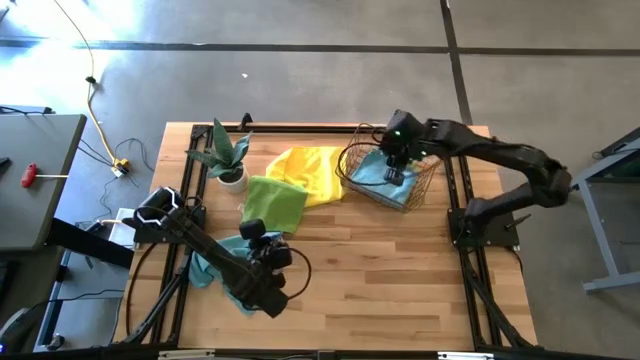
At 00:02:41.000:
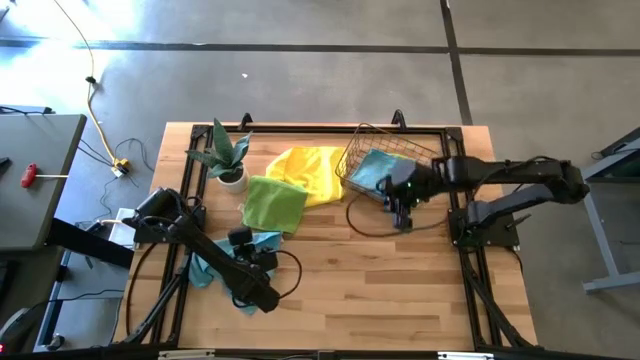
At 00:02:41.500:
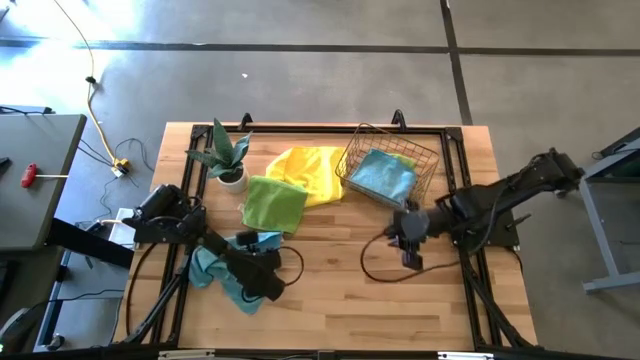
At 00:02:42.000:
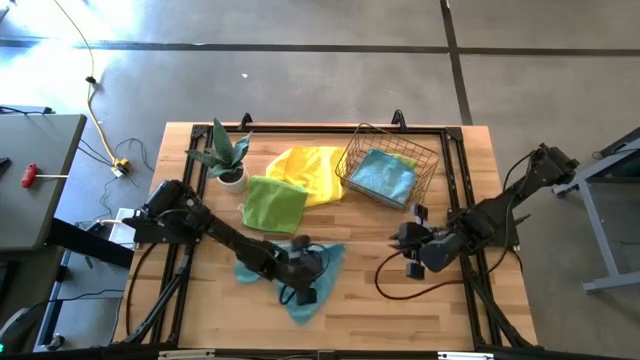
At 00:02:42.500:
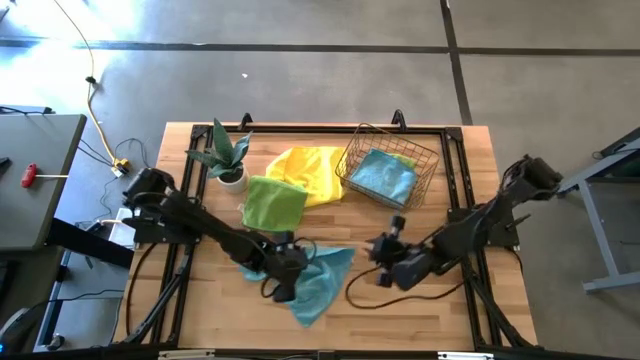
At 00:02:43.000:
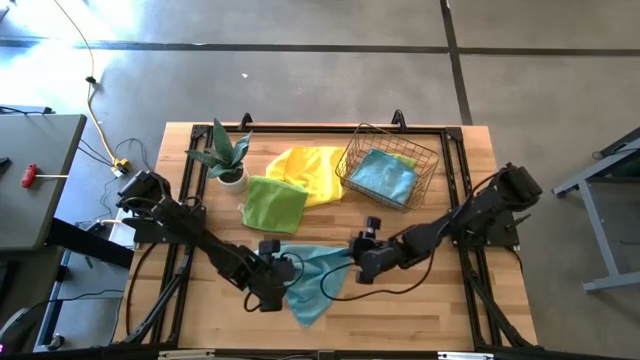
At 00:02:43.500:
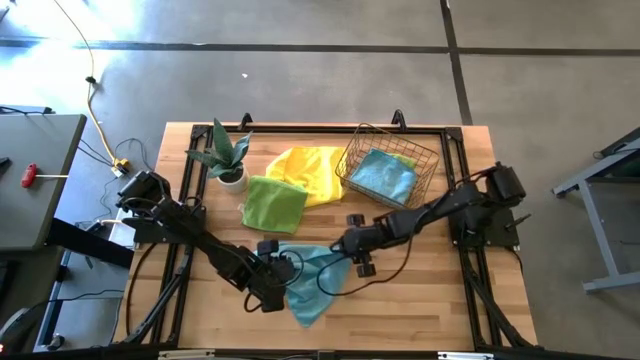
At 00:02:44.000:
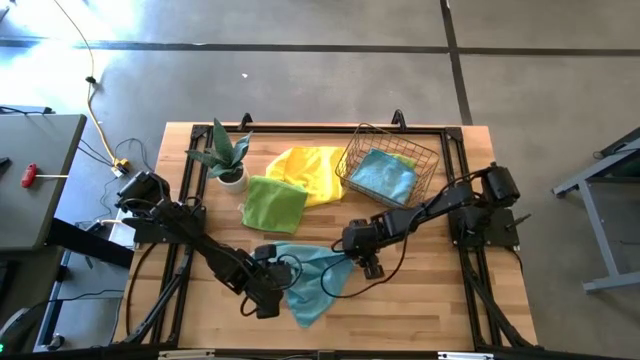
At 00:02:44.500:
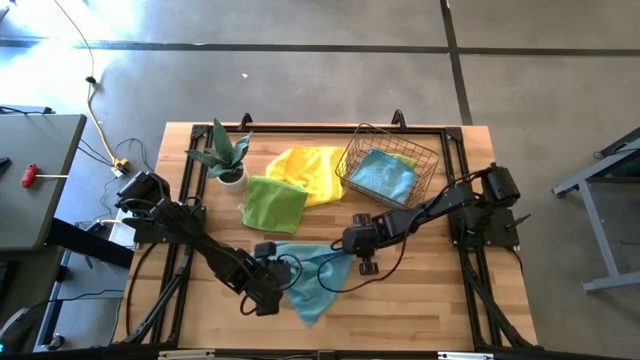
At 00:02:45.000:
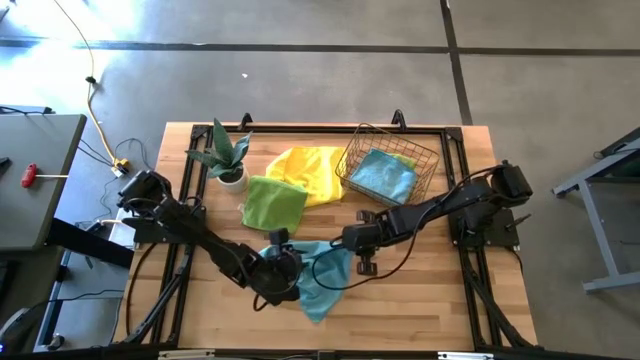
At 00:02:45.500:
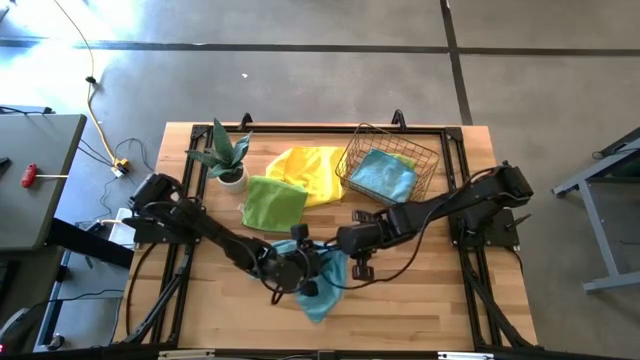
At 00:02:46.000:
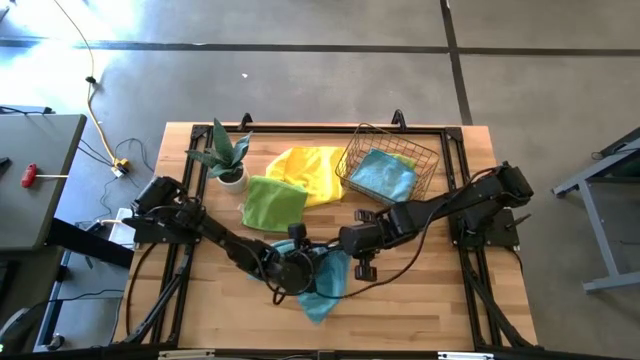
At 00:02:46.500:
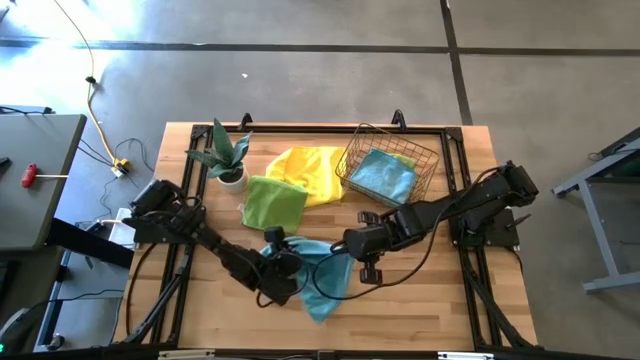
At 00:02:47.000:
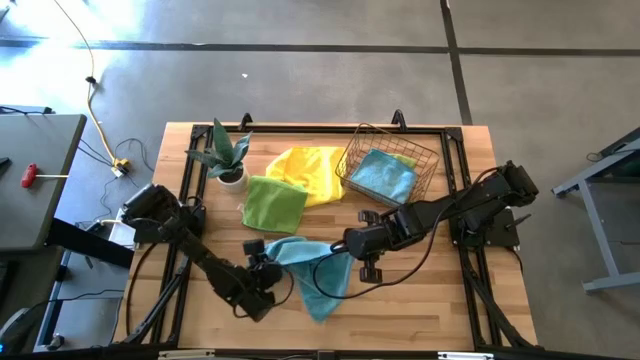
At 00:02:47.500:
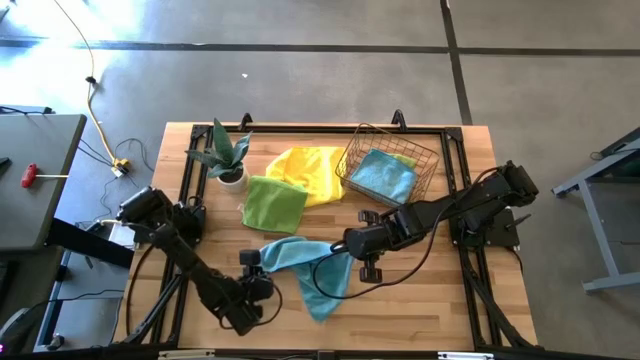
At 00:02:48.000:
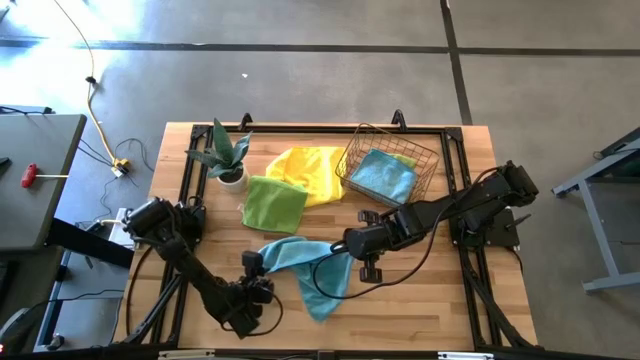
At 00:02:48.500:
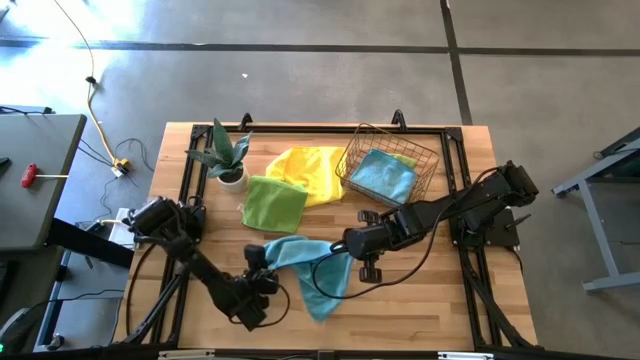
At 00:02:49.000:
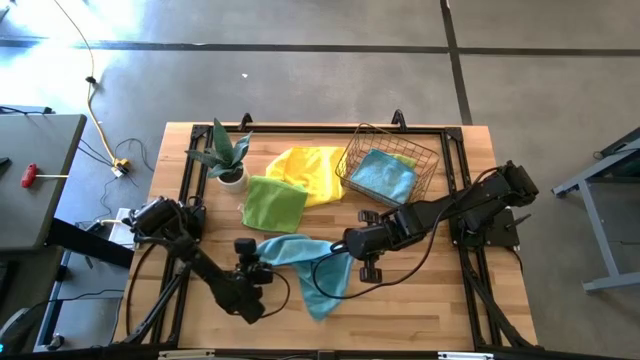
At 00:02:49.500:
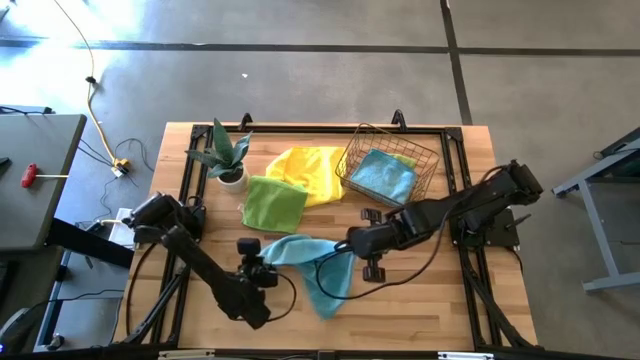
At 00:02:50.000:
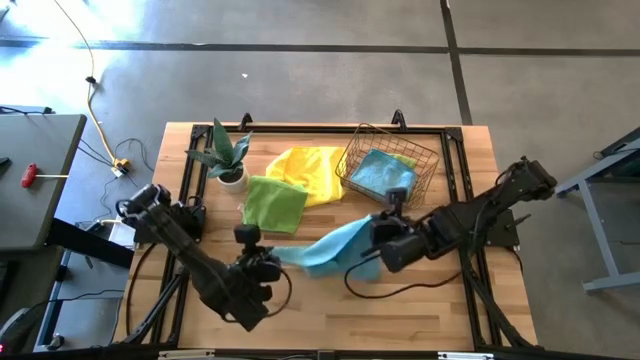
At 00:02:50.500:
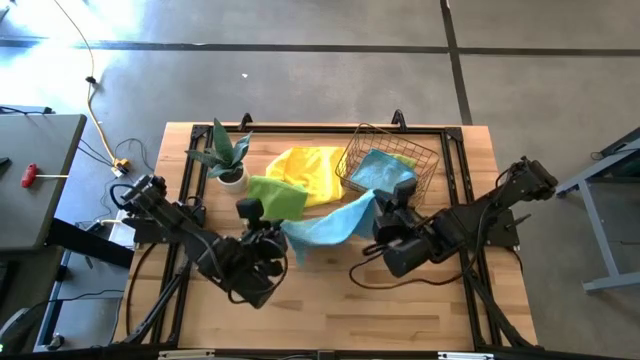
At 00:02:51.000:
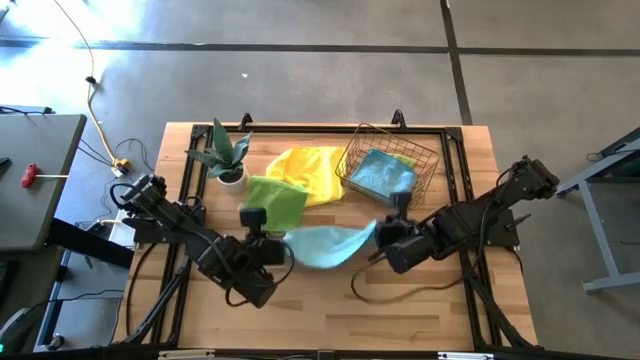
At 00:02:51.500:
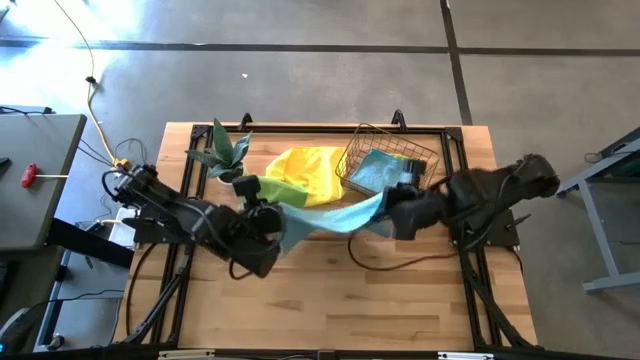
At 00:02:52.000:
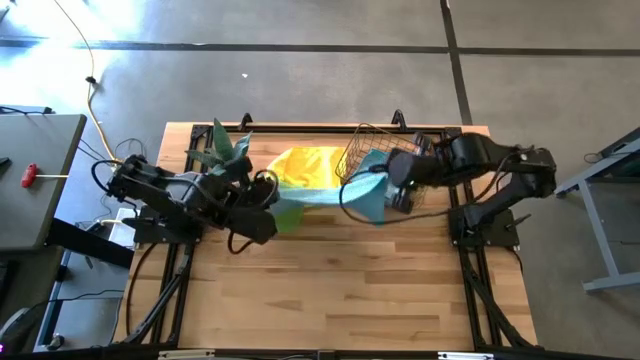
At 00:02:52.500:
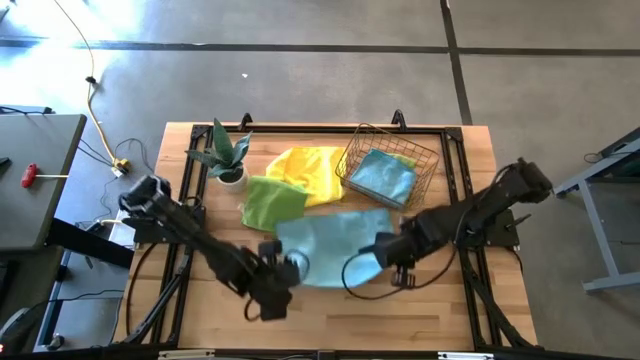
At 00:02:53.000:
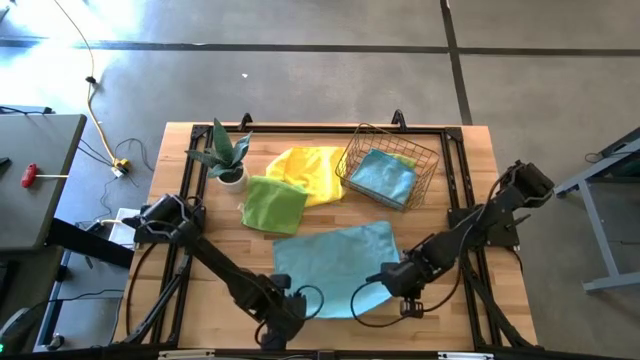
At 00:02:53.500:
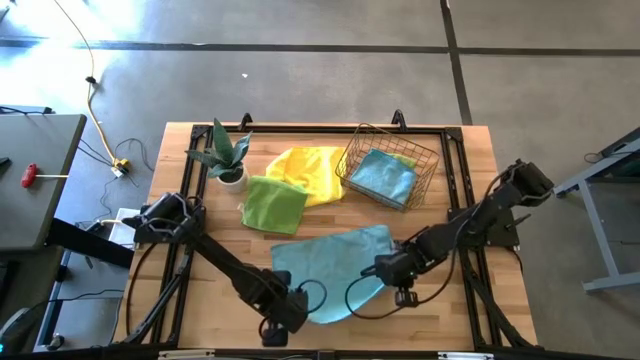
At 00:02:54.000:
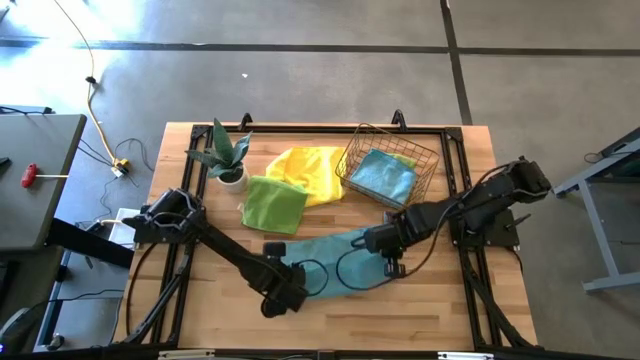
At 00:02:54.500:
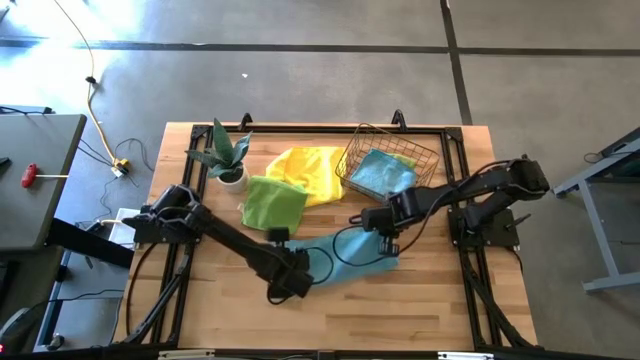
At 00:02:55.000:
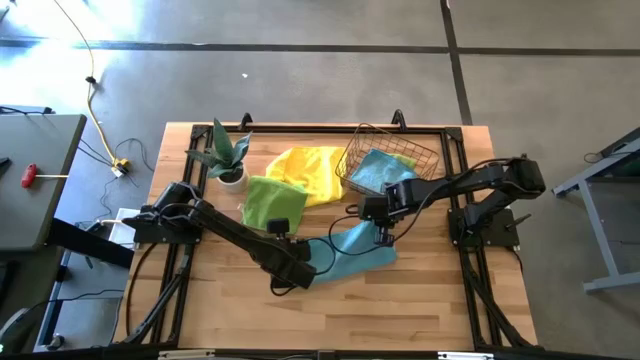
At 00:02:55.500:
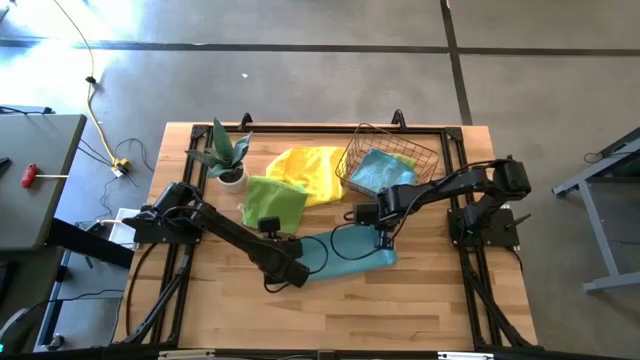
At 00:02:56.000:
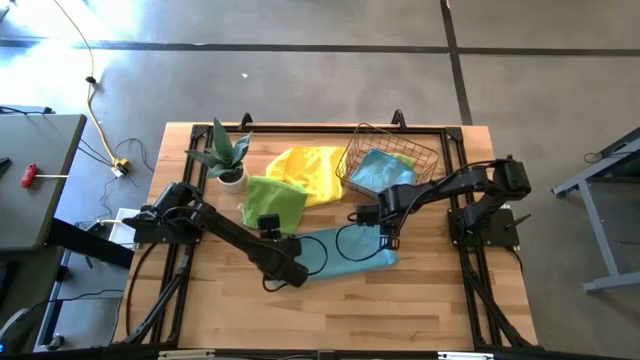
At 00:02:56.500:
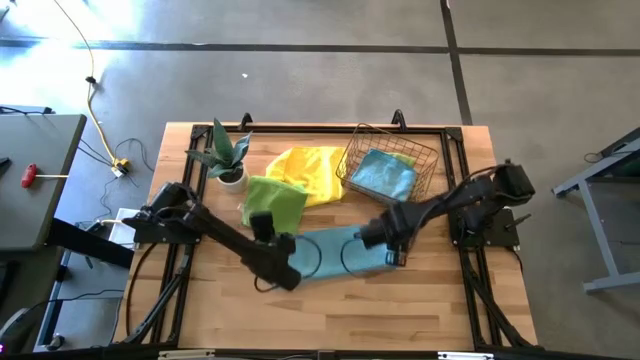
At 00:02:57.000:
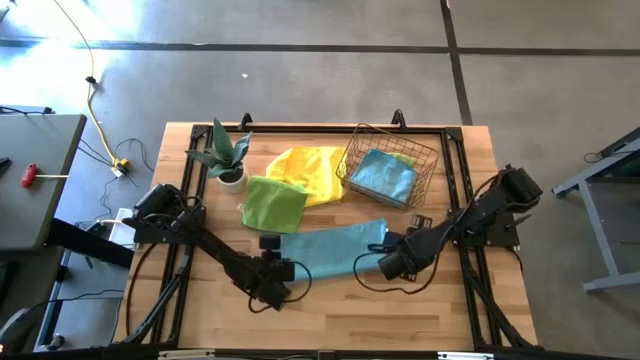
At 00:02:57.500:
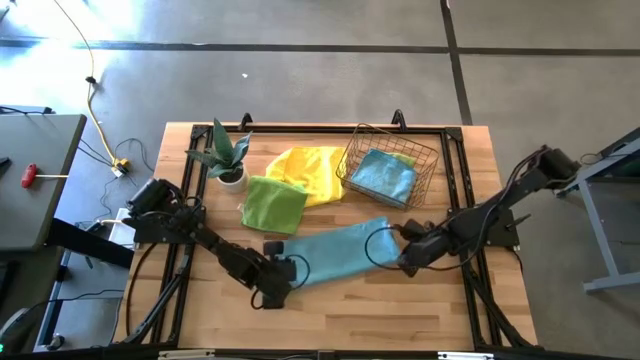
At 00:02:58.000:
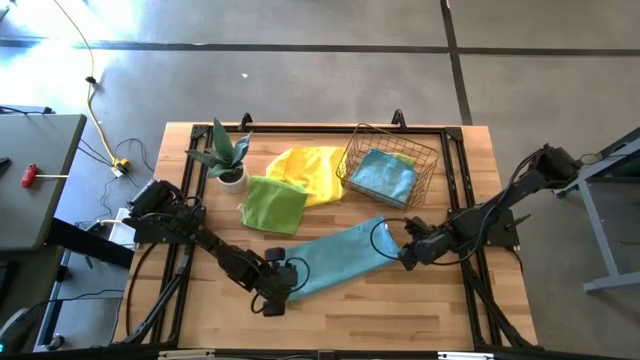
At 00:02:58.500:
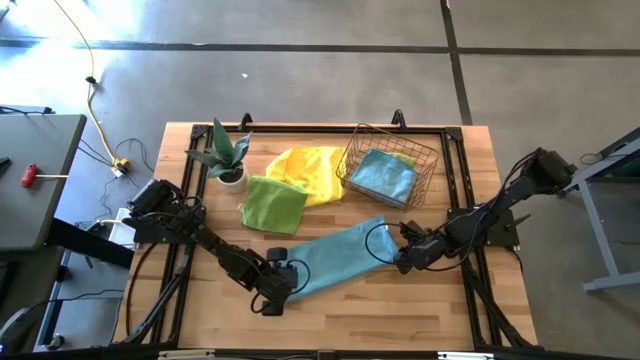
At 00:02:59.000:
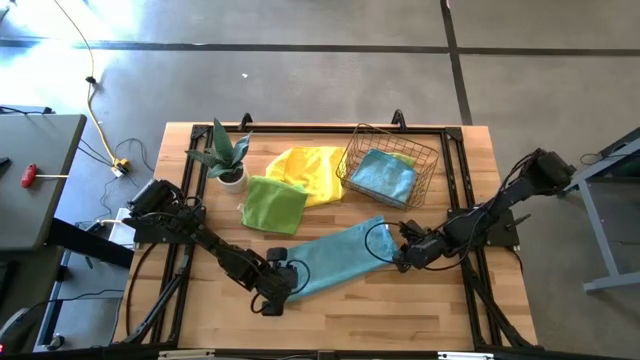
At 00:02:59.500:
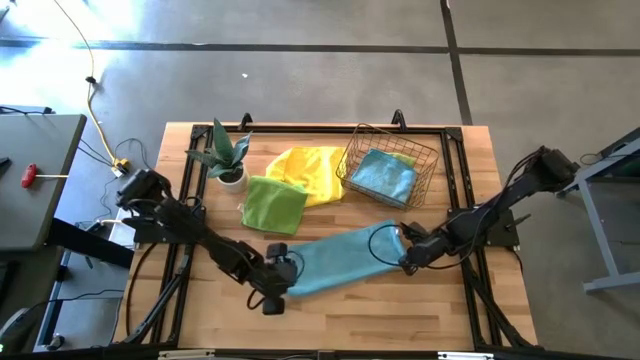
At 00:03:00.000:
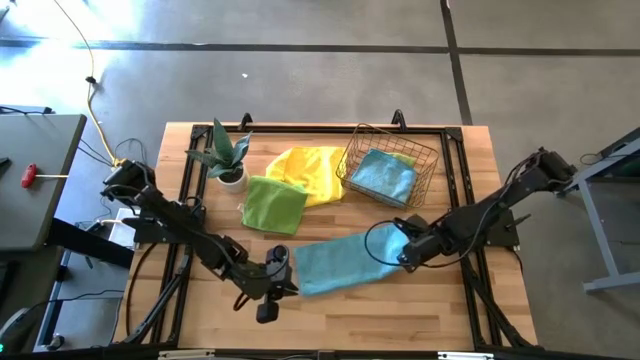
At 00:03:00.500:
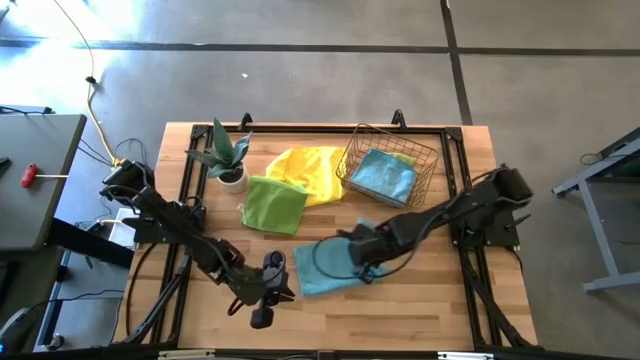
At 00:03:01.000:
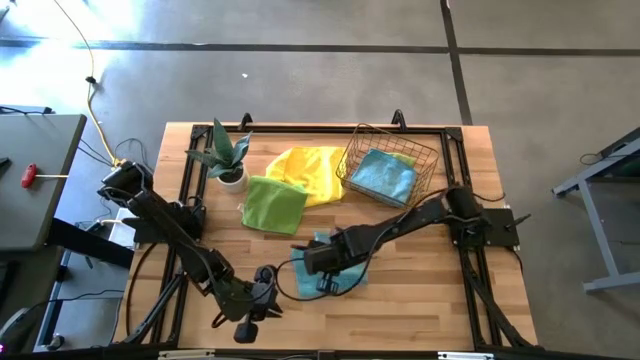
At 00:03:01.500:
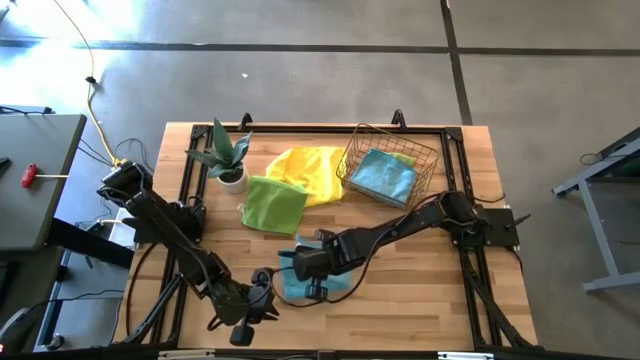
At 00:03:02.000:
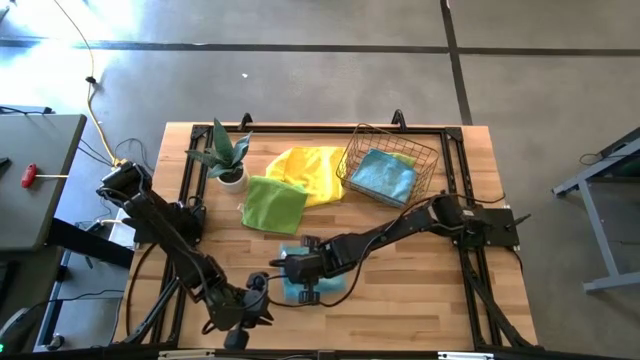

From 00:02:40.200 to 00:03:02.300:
Task: Fold microfiber towels
Fold the blue microfiber towel
